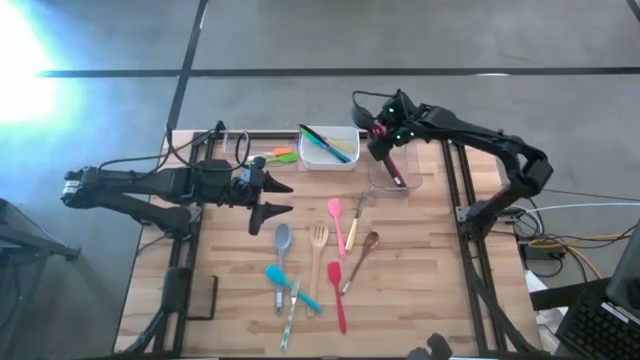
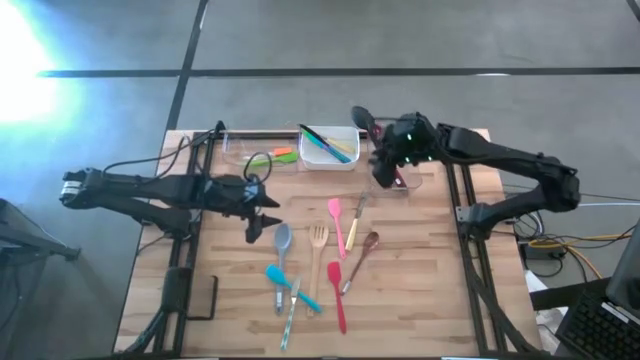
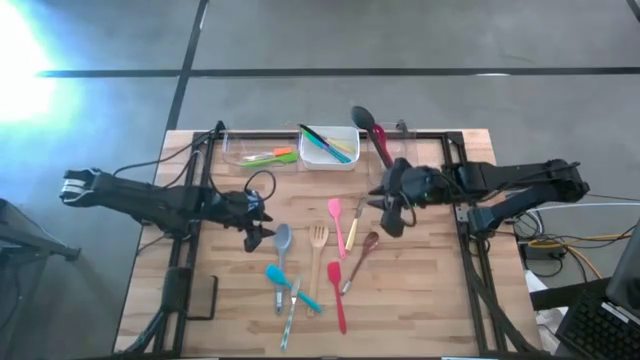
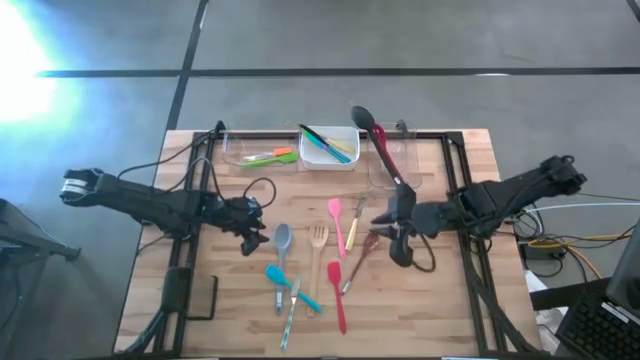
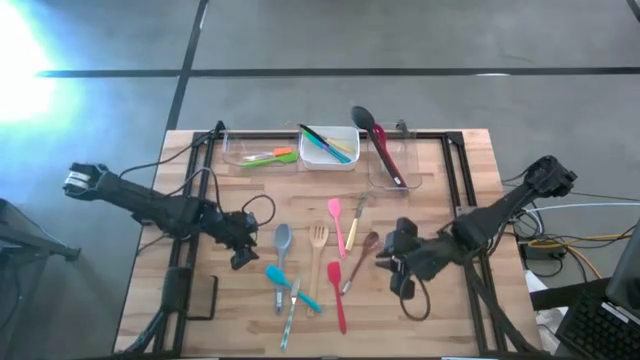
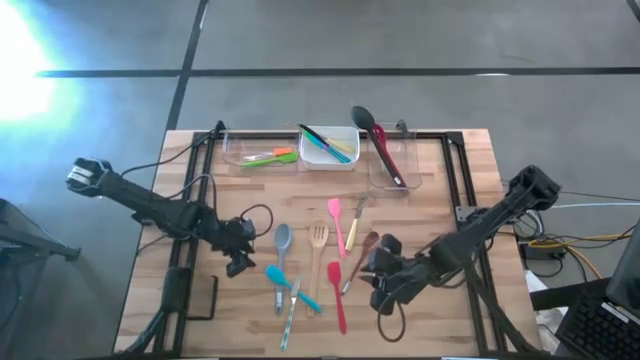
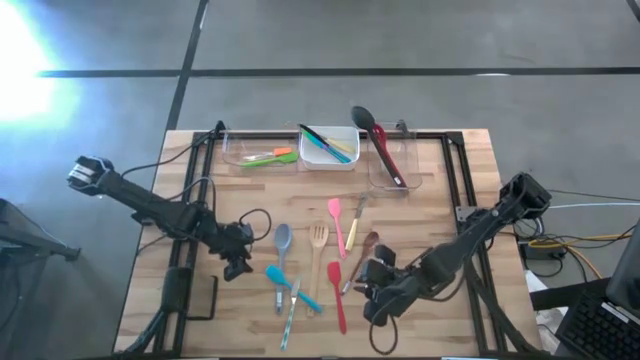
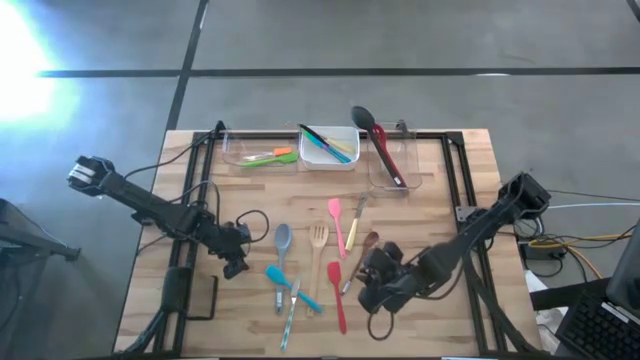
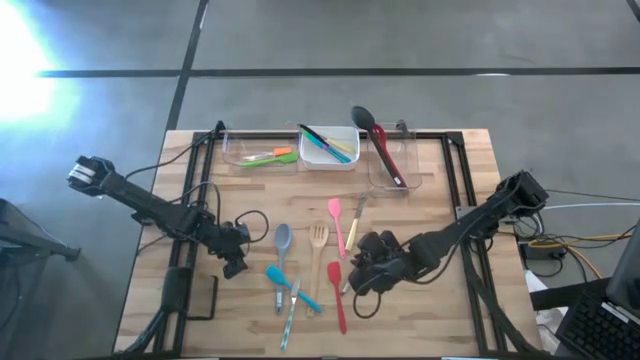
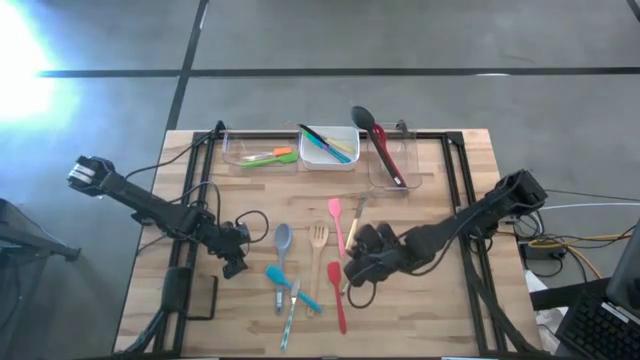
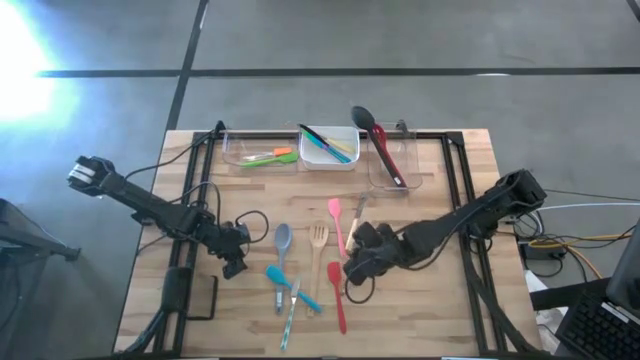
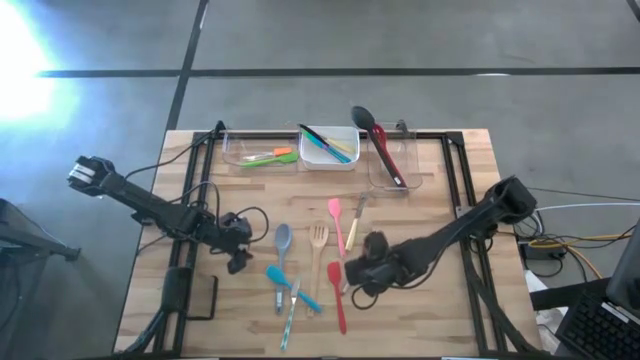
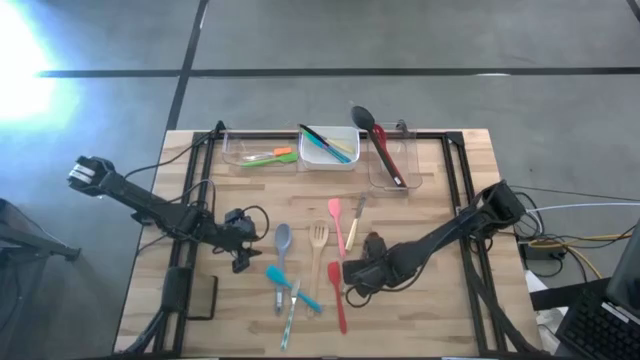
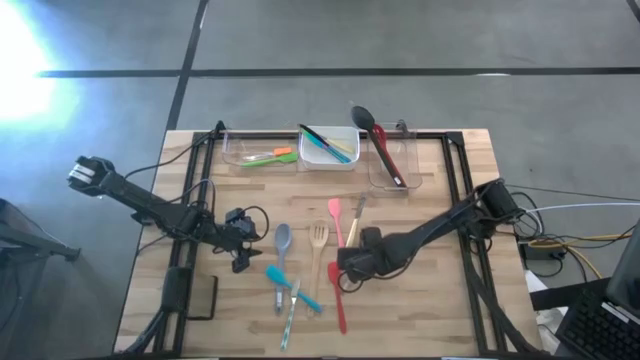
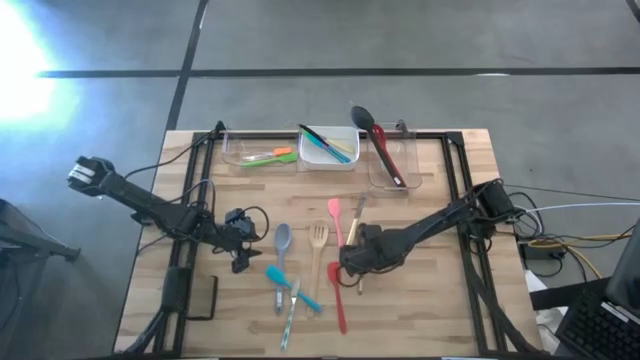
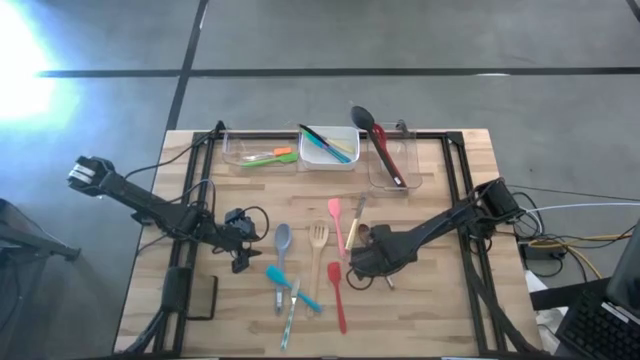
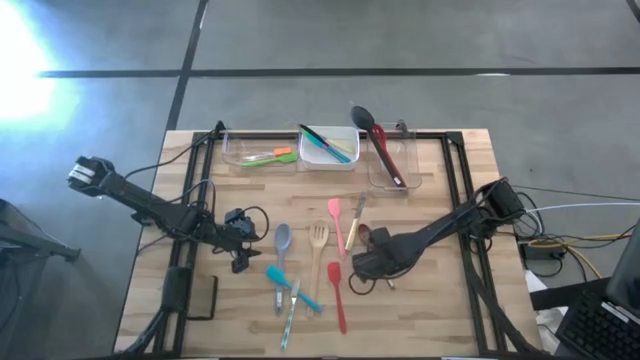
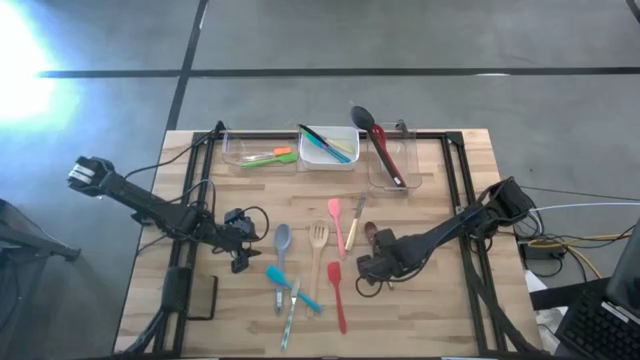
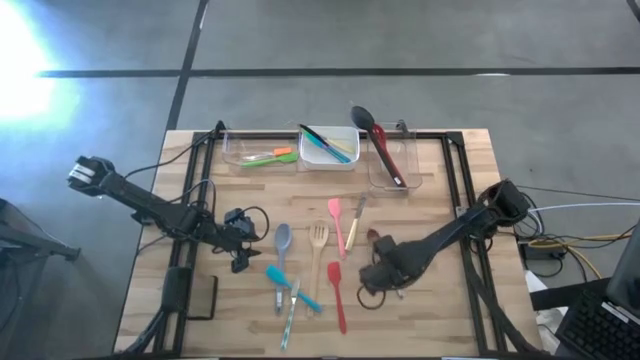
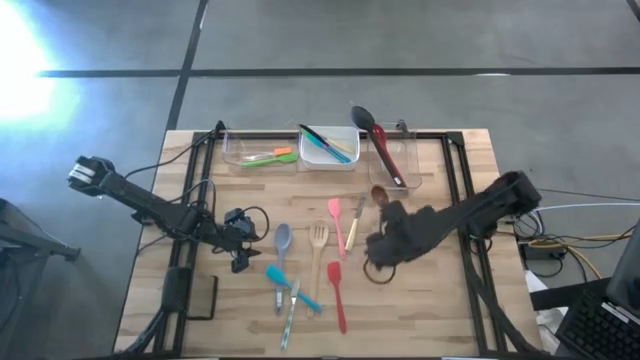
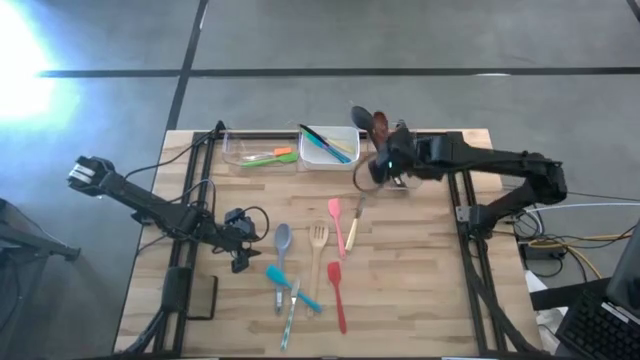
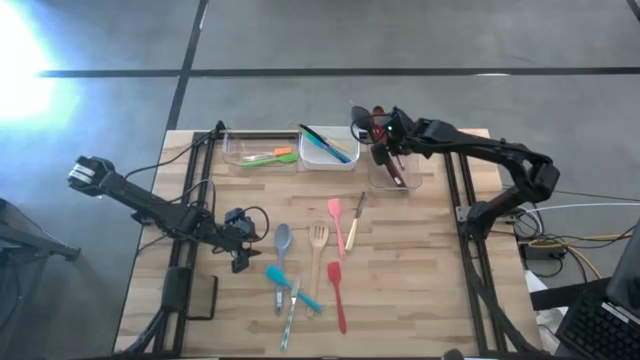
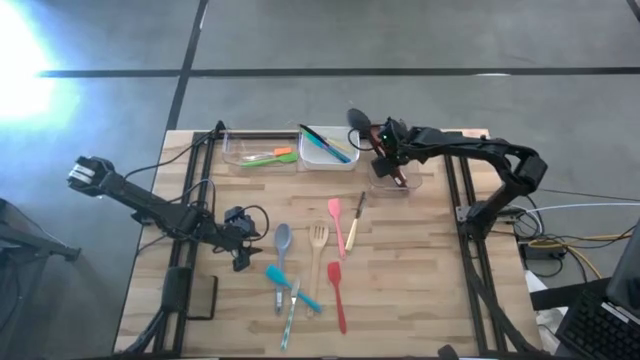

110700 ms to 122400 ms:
Task: Pick & Place Kitchen Items
Put the brown ladle into the right transparent bin

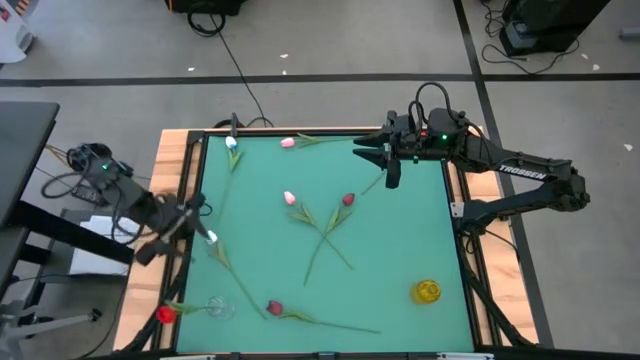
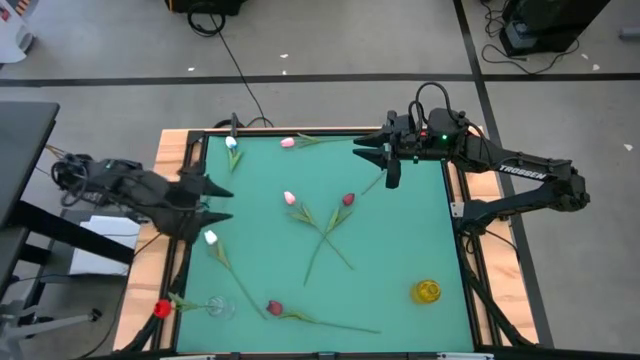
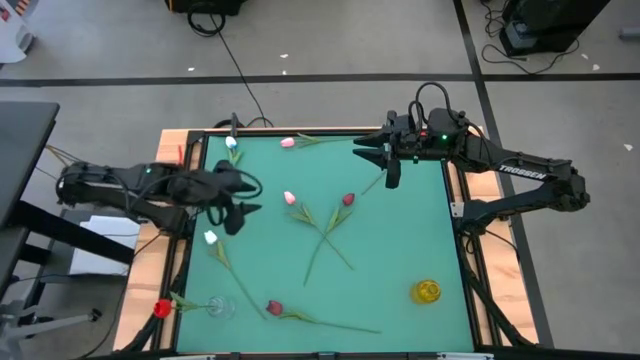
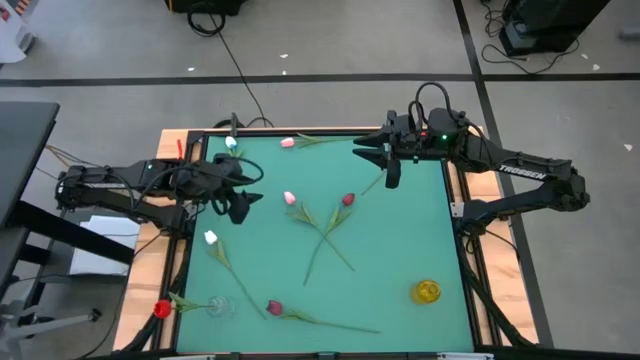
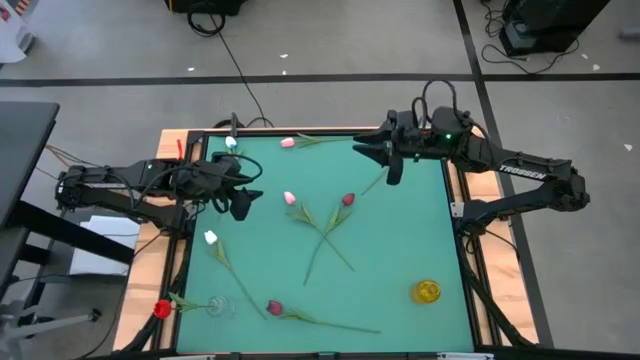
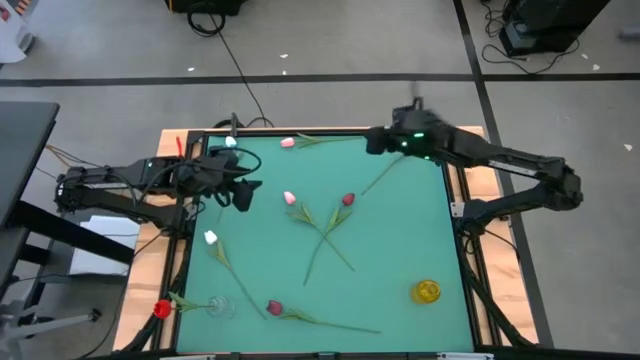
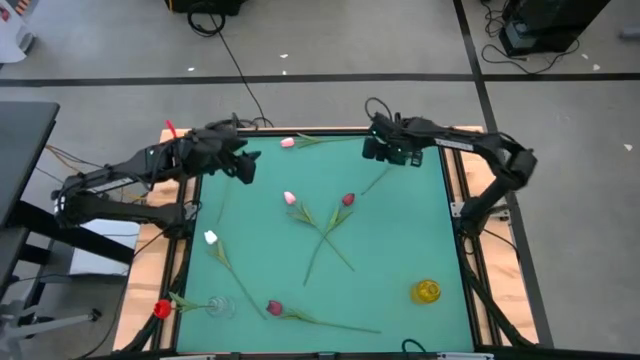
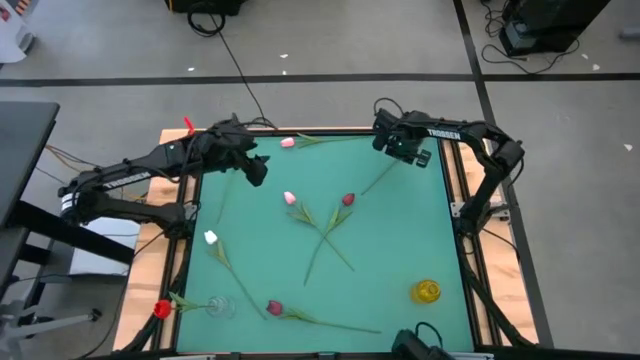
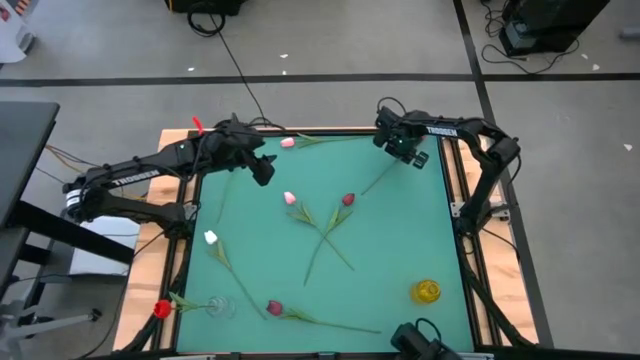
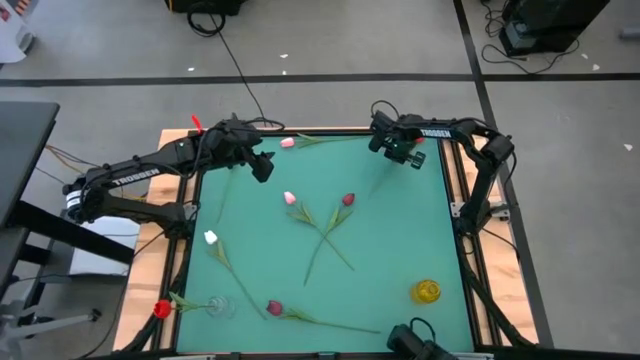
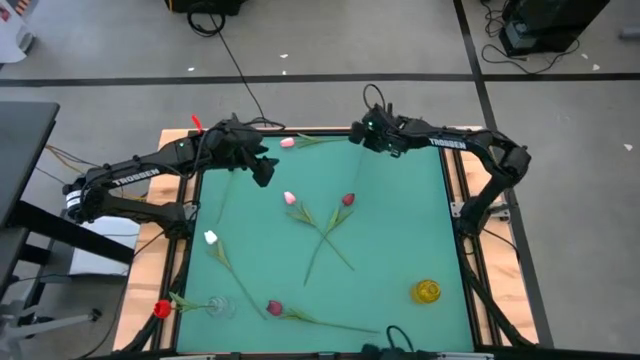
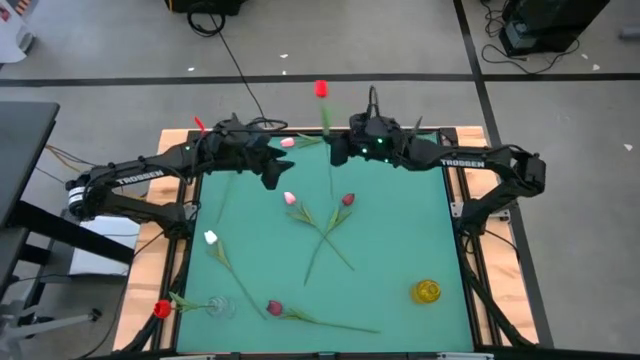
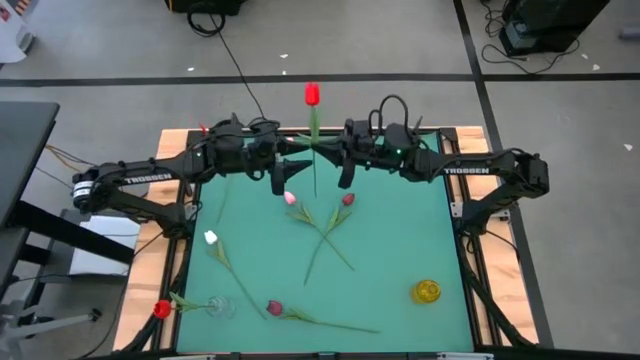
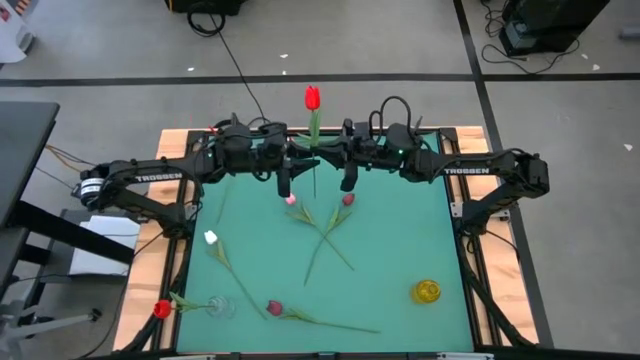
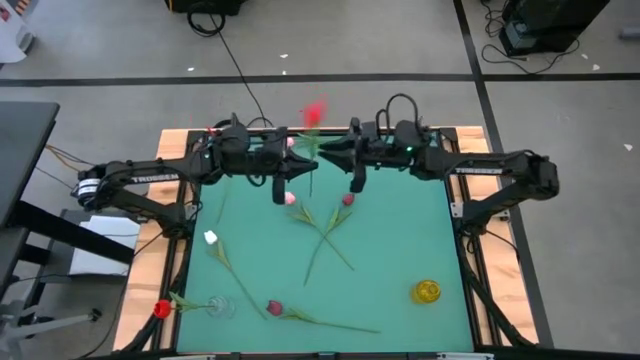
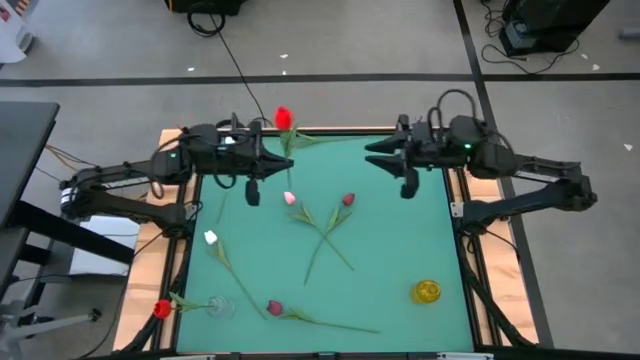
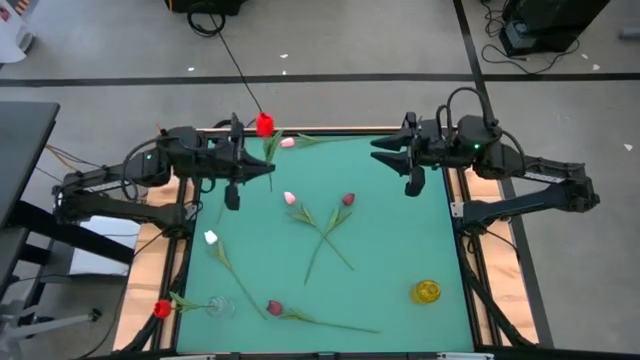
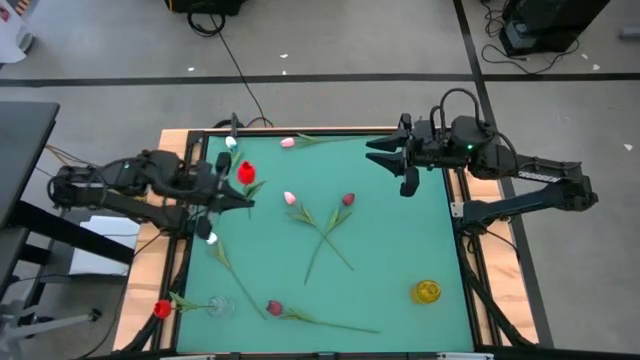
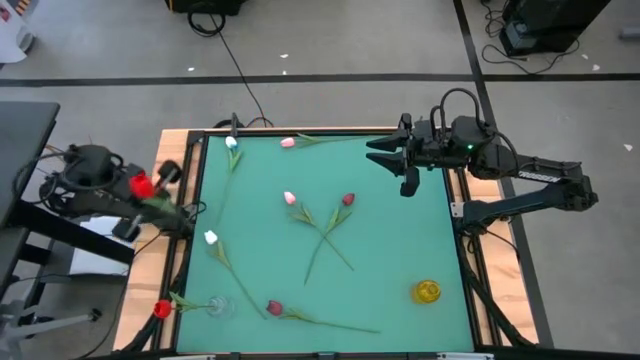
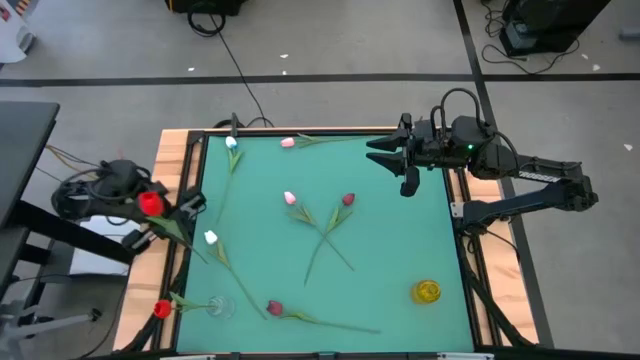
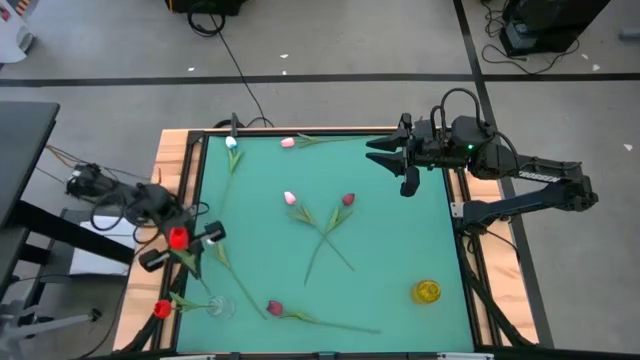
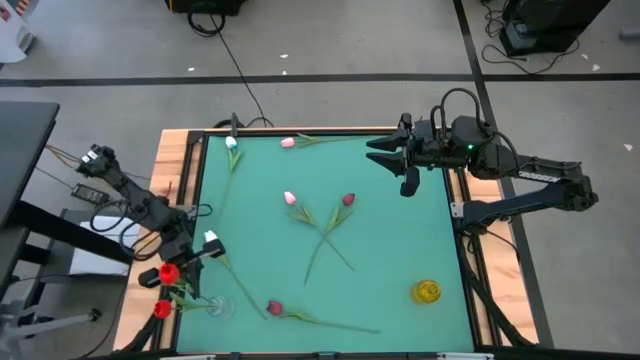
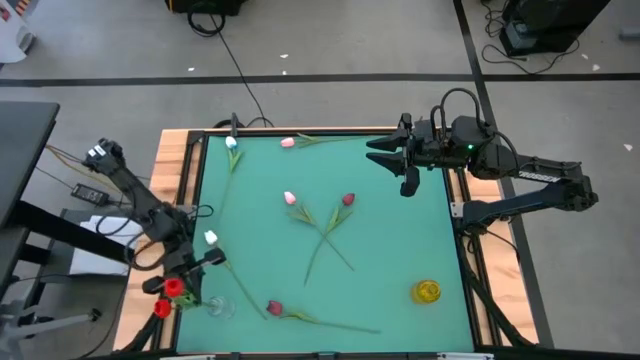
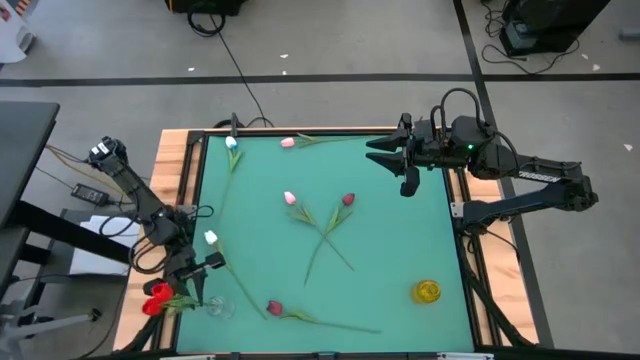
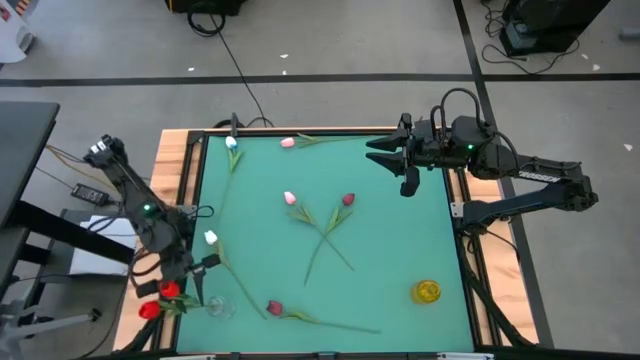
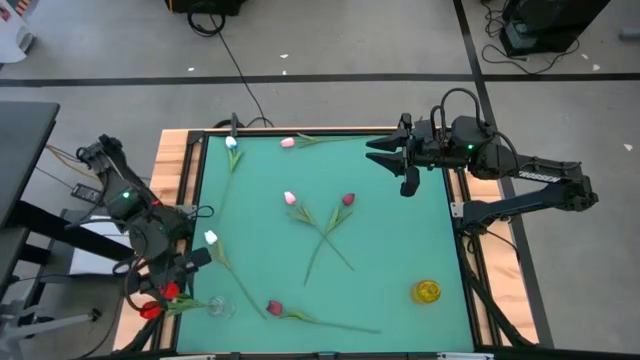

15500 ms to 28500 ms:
Task: Sort flowers into vase by color
Put the red tulip into the white transparent vase
